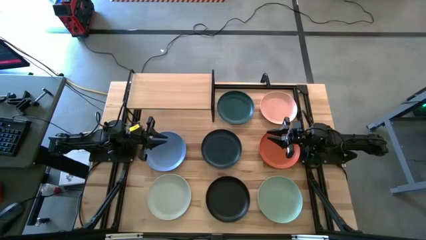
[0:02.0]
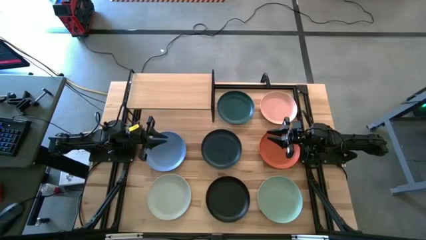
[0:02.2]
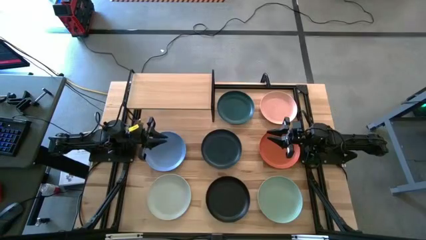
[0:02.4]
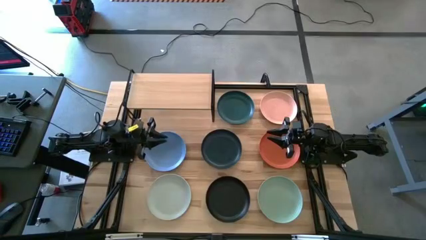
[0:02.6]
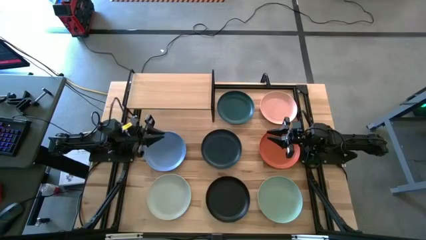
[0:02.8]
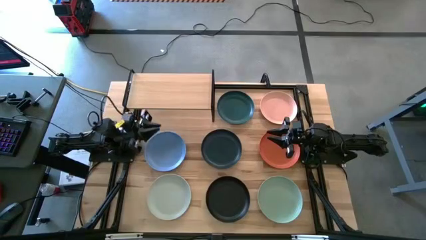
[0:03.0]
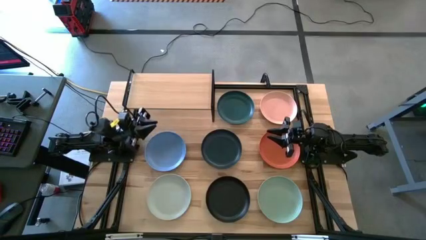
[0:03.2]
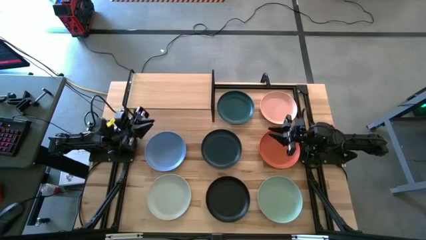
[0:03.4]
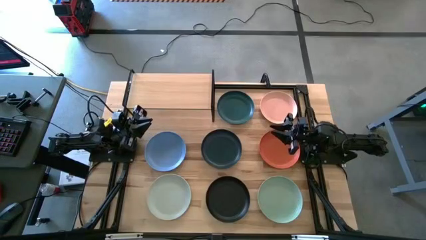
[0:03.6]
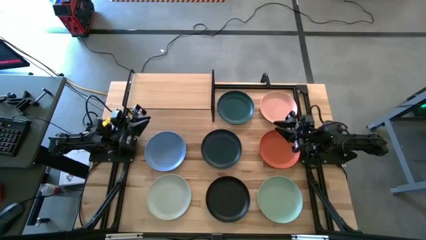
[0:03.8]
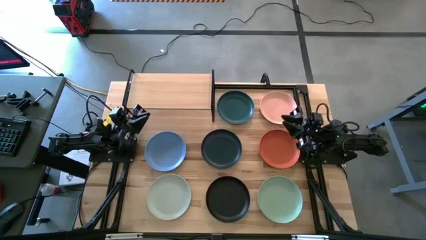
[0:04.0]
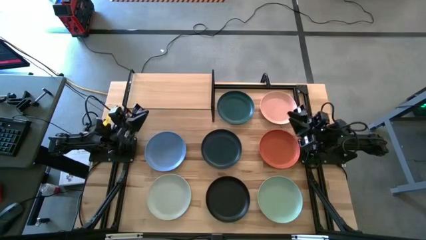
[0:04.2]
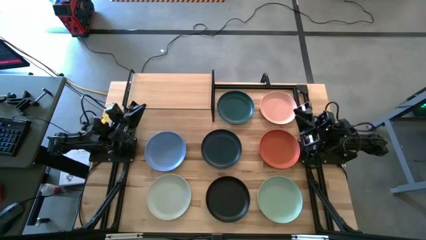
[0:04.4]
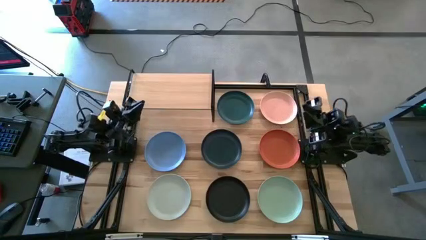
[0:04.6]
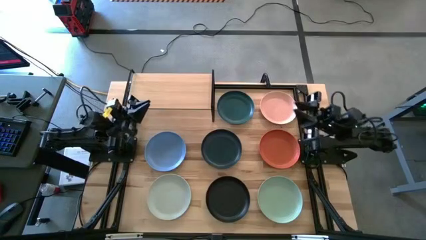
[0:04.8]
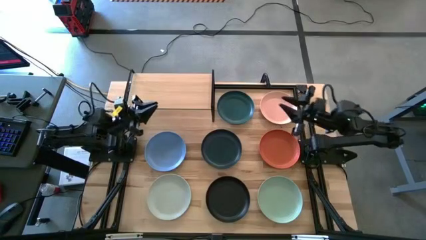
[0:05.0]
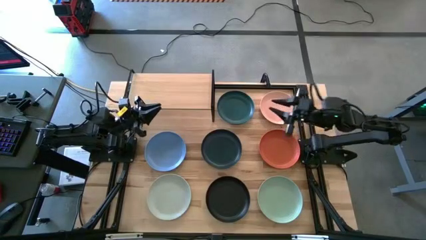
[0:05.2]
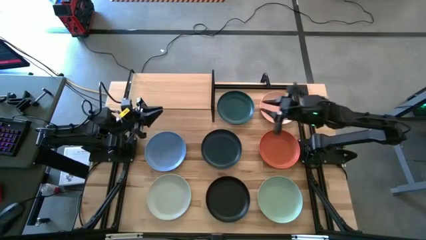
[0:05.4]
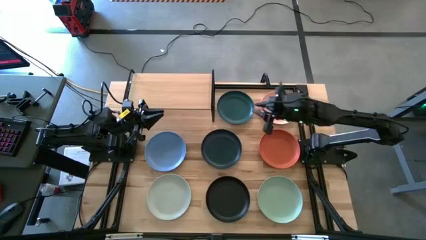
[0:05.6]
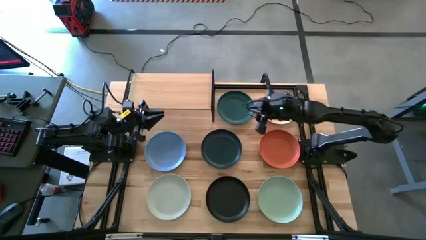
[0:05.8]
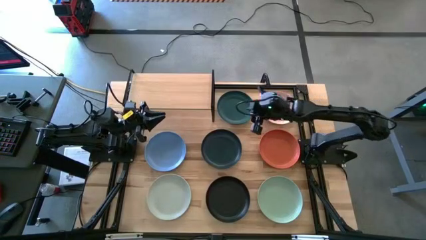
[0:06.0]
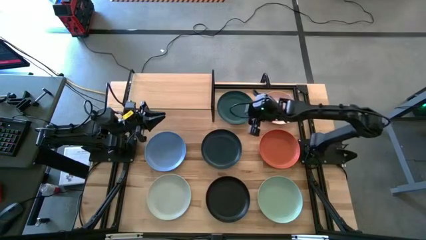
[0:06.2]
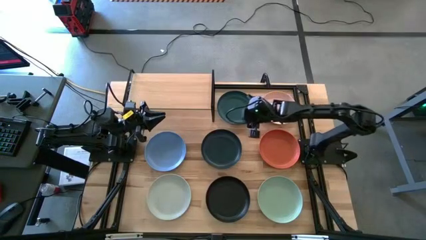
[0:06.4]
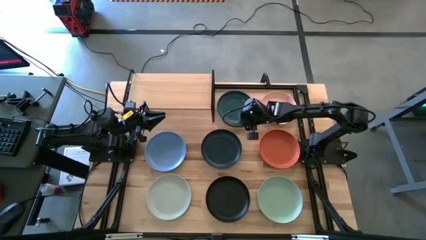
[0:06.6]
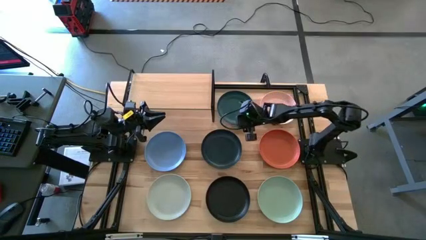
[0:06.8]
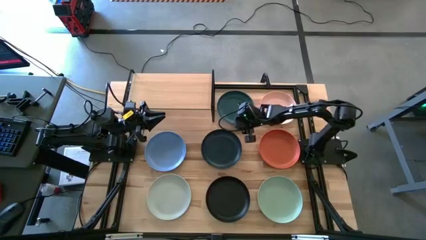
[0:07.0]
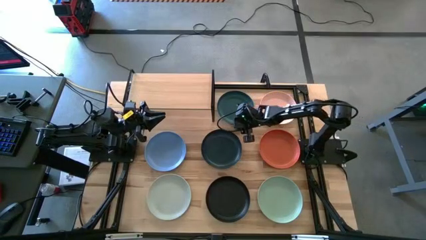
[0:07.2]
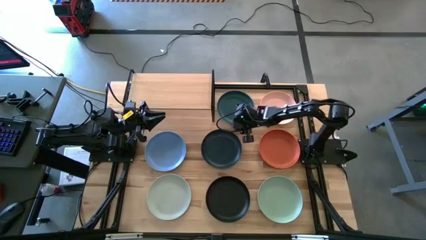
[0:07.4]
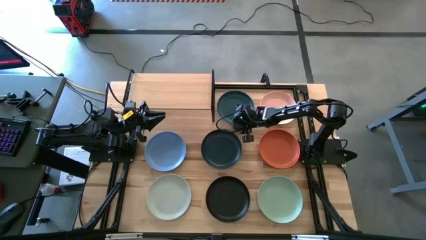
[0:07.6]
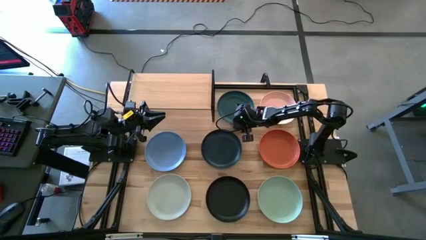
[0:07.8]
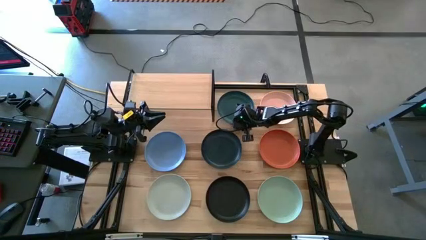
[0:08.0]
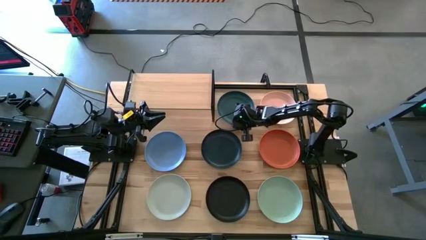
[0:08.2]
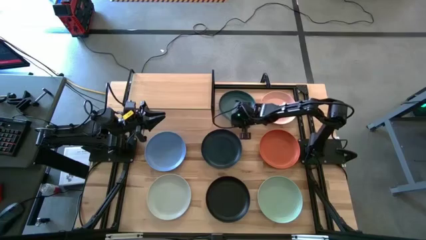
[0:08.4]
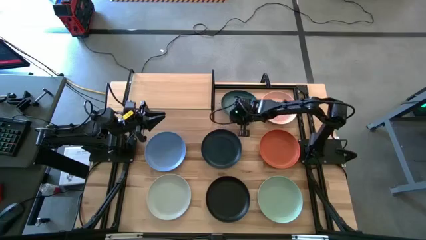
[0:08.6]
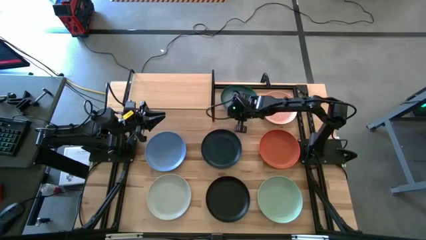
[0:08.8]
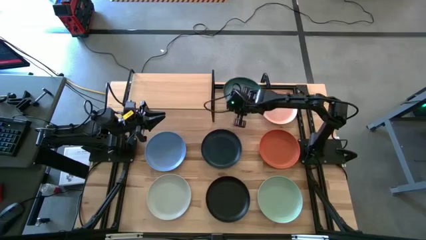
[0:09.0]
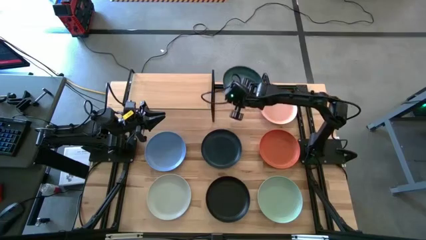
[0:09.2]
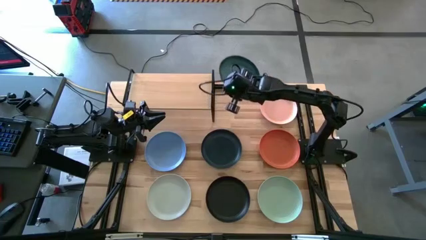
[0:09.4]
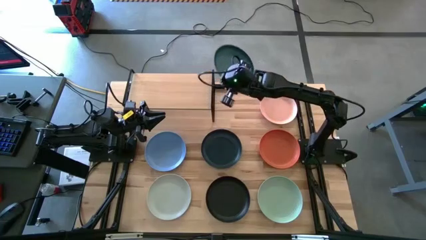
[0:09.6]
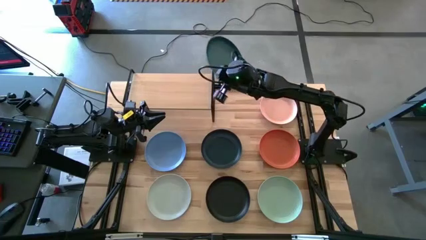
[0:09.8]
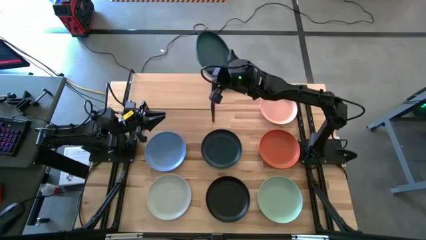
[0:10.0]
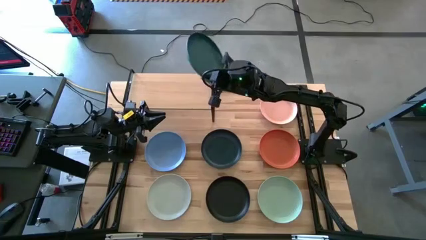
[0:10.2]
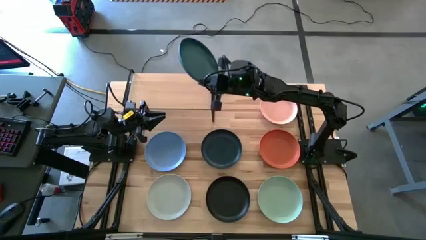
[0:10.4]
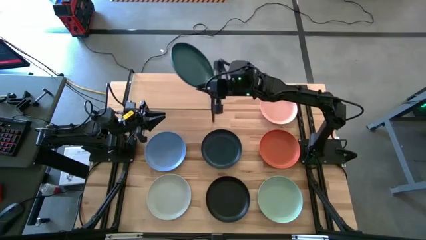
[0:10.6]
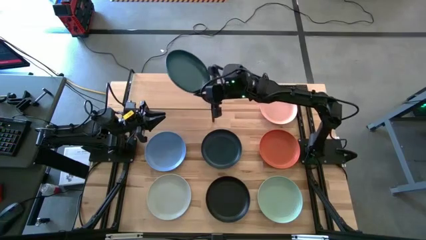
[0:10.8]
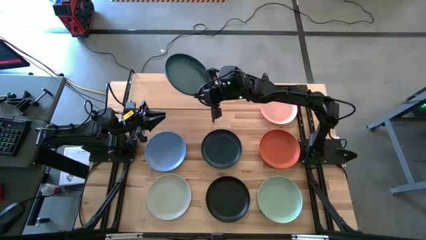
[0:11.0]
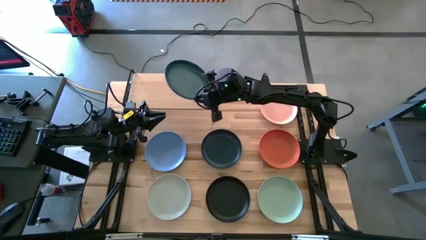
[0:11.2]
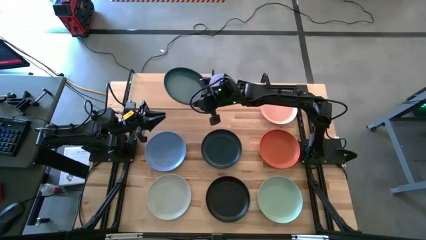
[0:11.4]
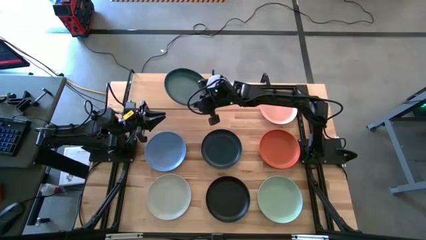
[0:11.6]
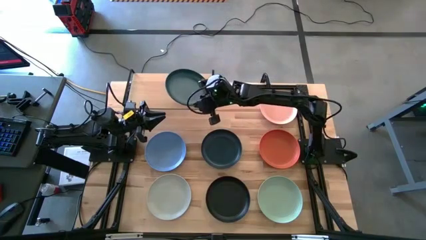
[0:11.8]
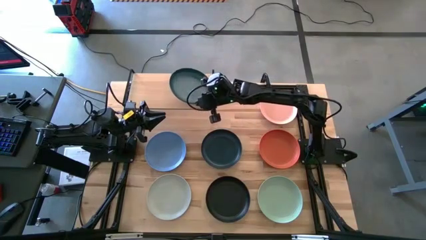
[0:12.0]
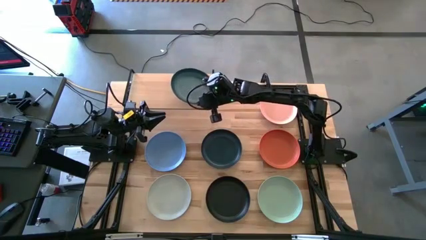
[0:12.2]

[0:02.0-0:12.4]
Task: Place and stack plates onto a shelf
Put the top dark green plate on the shelf

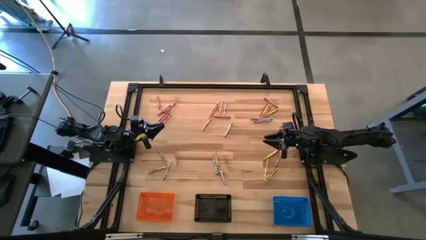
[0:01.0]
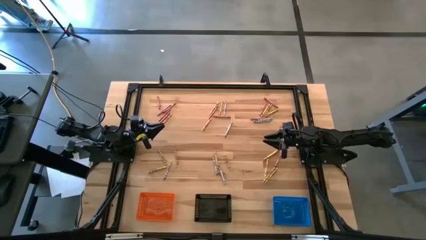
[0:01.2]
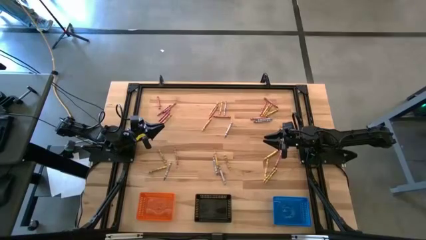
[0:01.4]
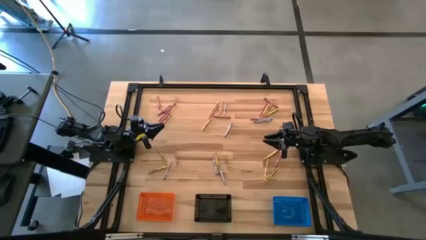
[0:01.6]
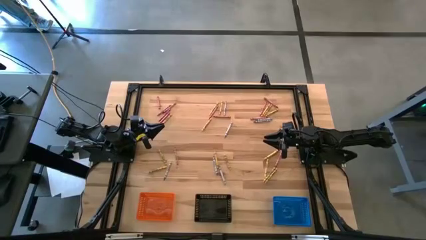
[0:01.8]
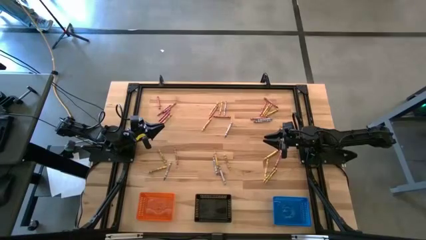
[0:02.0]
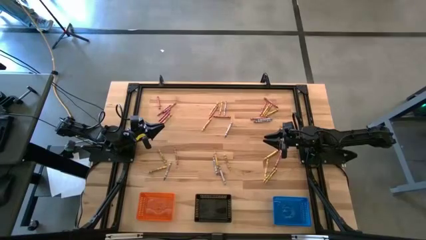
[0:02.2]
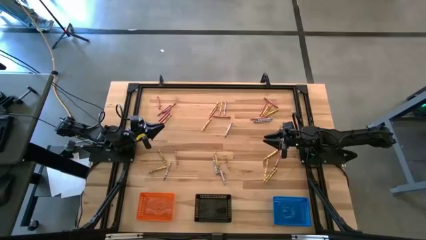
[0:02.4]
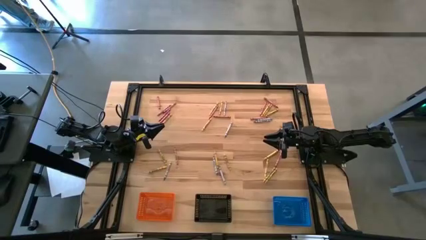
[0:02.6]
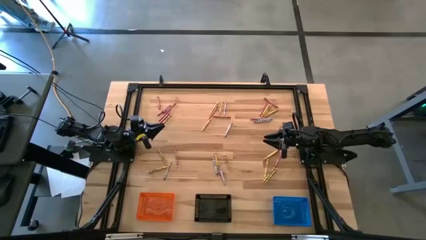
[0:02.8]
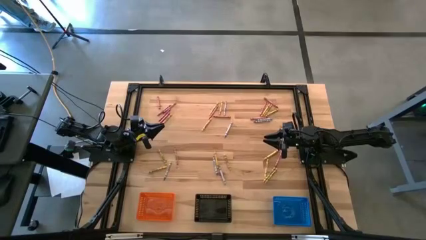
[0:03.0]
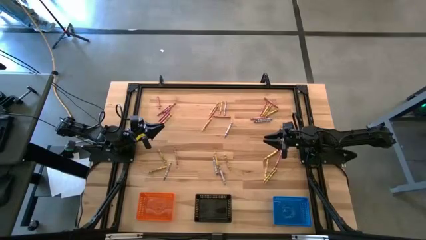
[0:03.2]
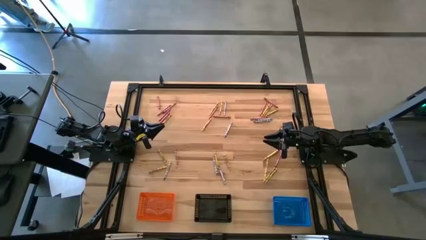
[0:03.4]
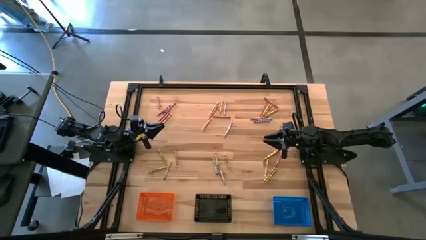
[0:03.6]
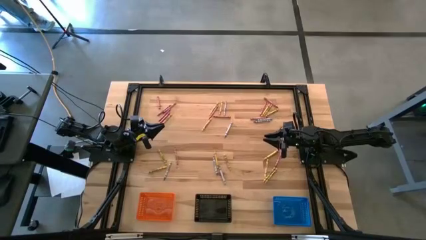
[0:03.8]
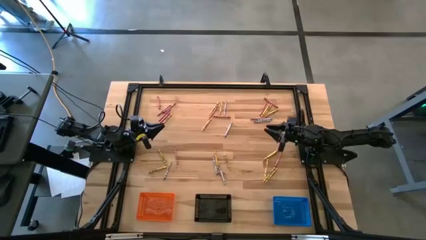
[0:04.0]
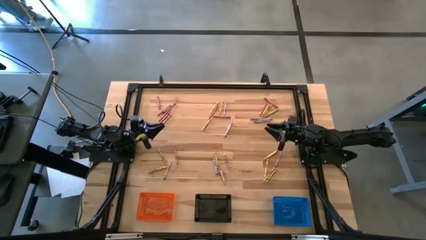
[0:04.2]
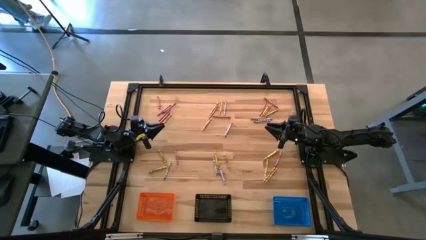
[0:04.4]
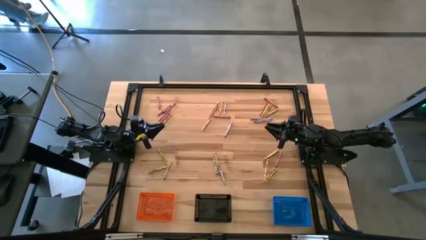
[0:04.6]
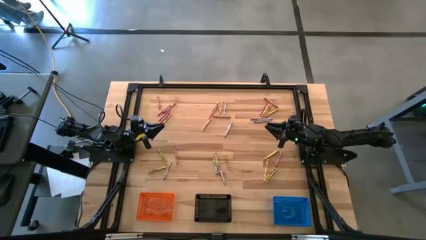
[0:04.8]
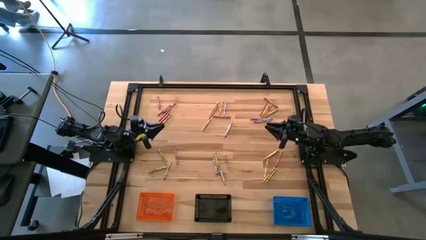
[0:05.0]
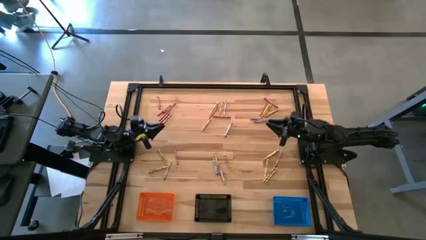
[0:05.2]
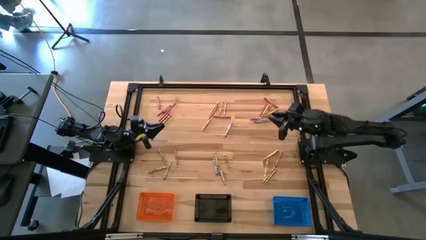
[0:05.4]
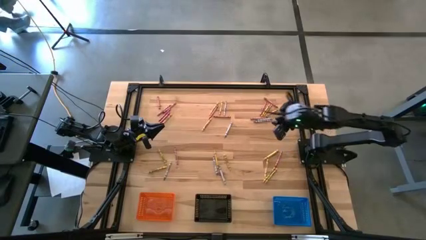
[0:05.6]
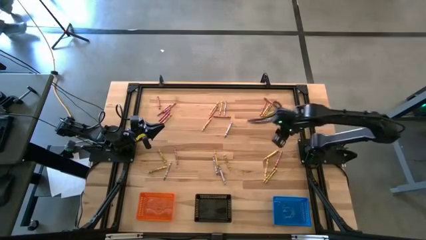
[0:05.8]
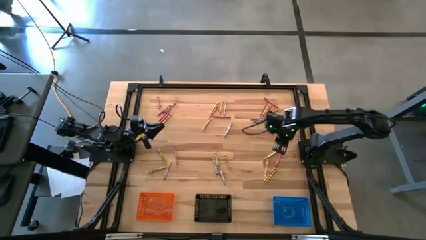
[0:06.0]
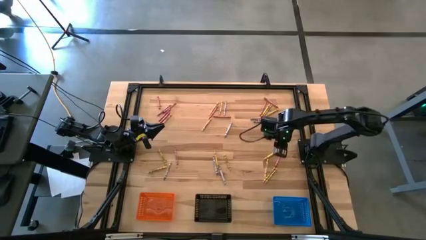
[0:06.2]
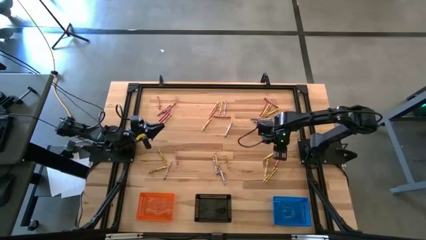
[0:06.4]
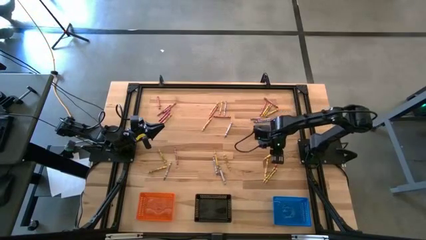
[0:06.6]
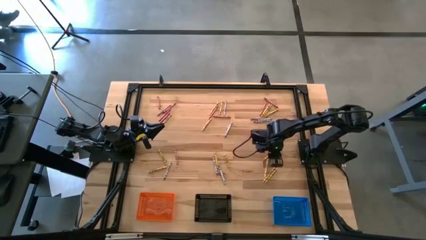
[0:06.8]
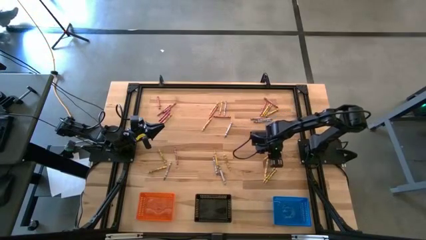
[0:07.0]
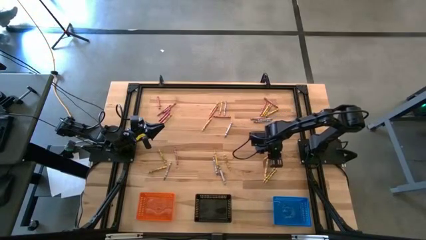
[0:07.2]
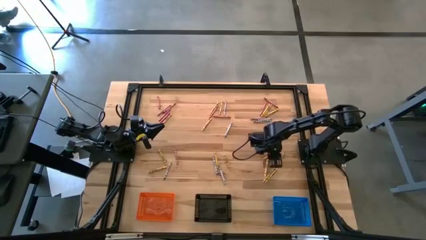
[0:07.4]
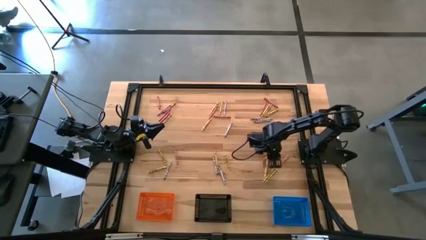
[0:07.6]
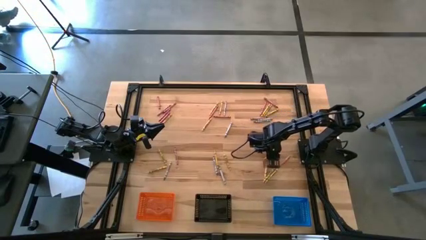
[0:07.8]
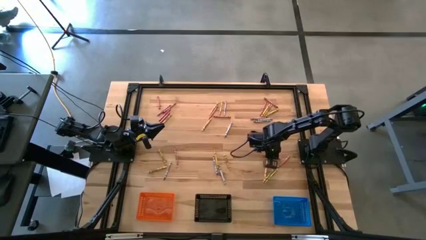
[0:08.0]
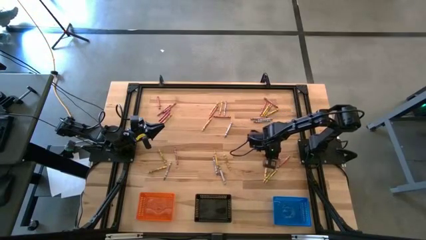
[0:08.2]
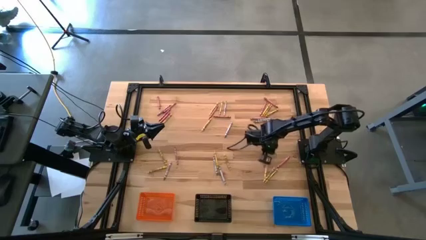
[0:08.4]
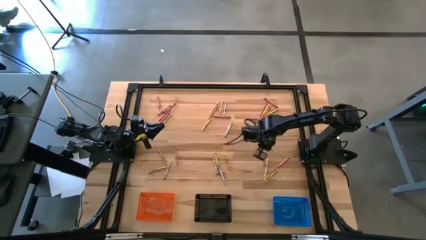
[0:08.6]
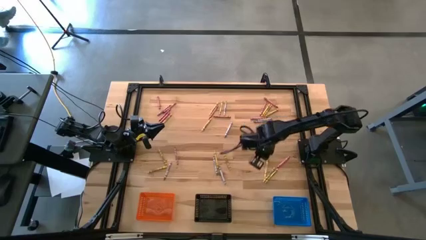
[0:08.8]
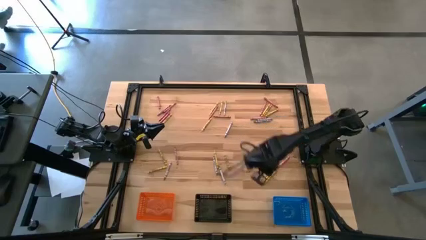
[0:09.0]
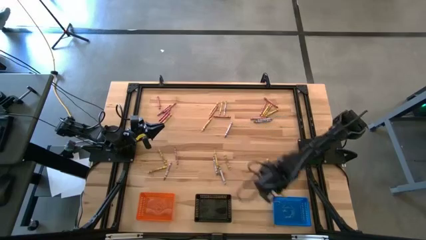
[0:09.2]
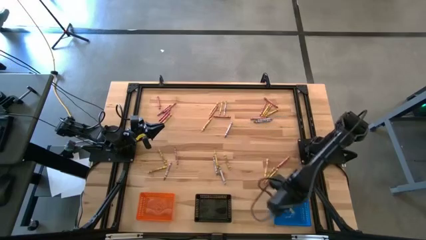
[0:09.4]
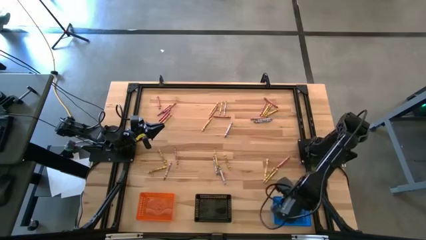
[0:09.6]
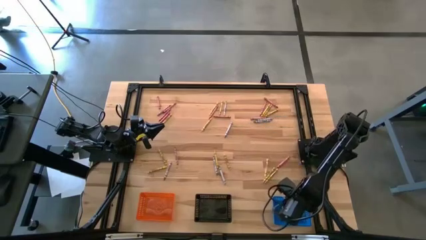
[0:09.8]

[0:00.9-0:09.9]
Task: Sort crayons
Put the yellow crayon into the blue bin
